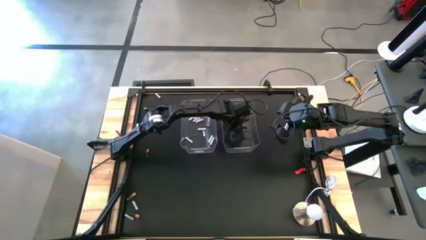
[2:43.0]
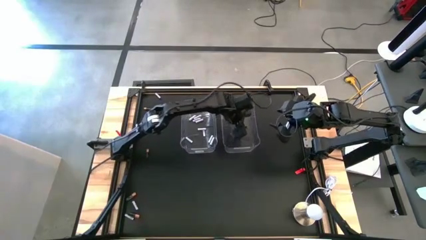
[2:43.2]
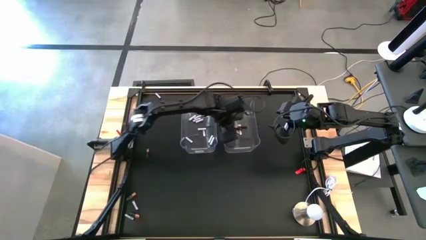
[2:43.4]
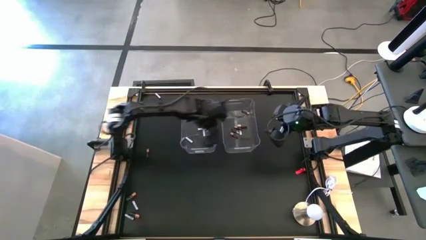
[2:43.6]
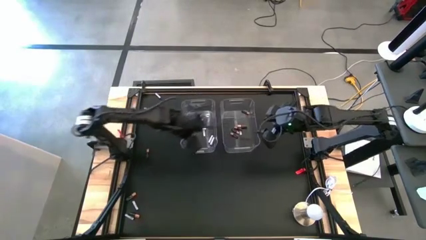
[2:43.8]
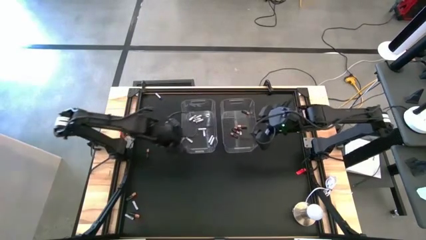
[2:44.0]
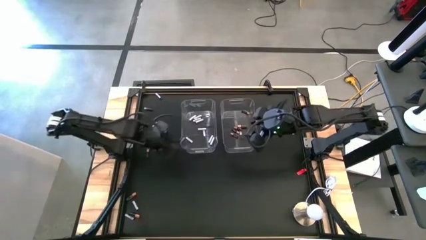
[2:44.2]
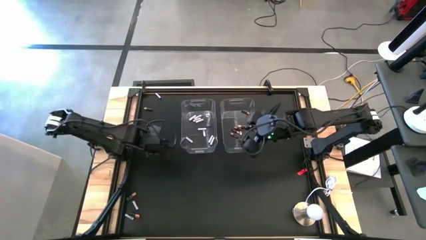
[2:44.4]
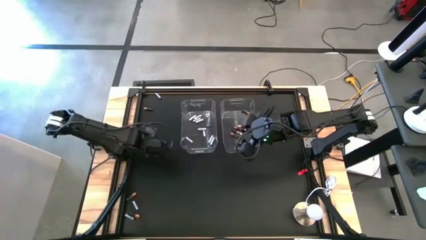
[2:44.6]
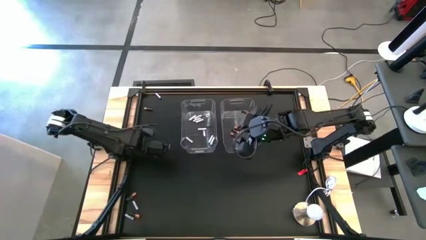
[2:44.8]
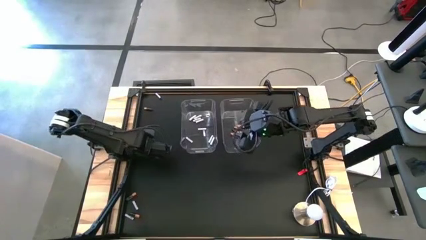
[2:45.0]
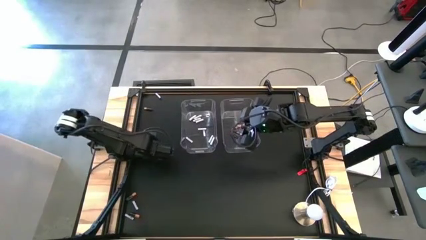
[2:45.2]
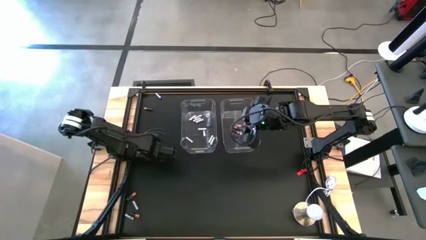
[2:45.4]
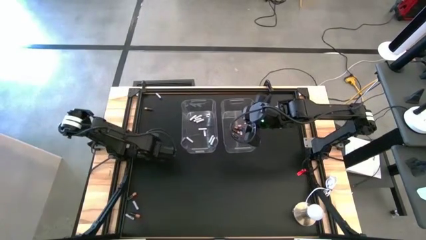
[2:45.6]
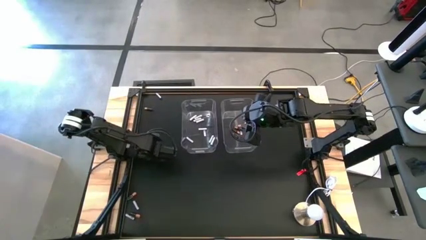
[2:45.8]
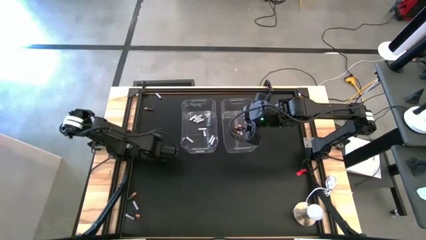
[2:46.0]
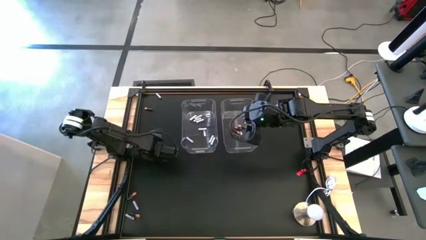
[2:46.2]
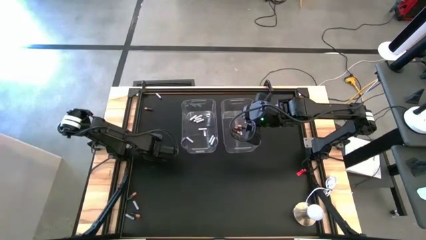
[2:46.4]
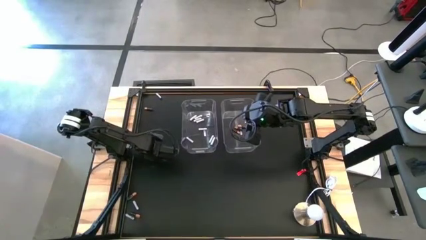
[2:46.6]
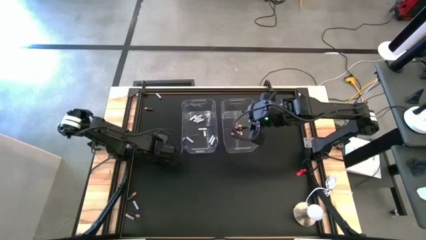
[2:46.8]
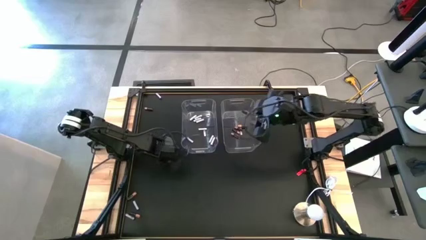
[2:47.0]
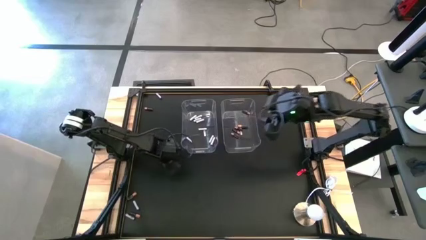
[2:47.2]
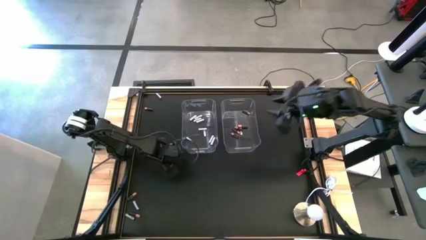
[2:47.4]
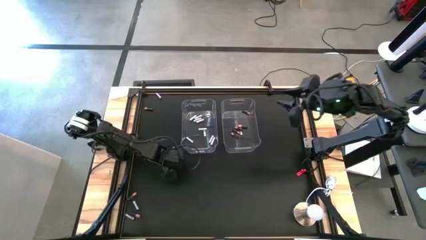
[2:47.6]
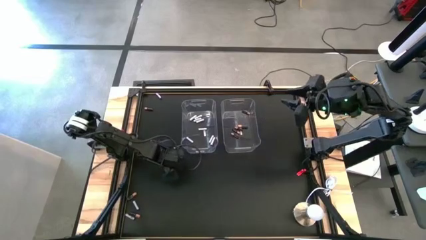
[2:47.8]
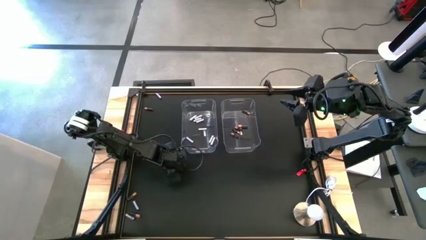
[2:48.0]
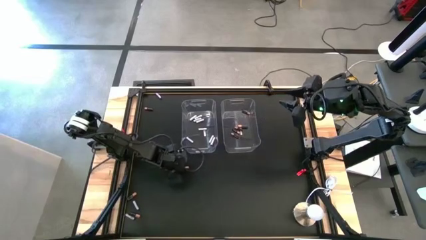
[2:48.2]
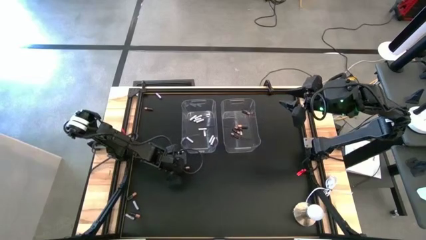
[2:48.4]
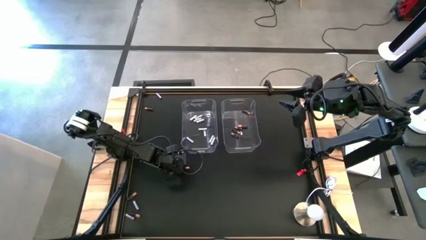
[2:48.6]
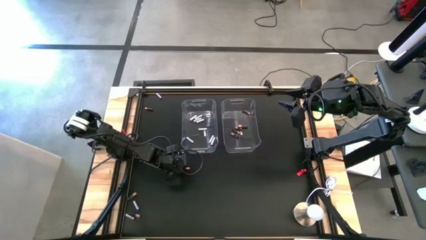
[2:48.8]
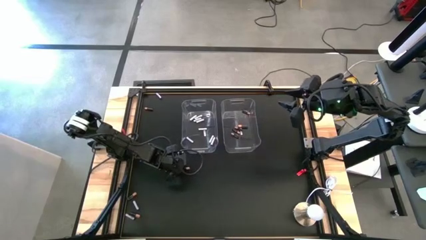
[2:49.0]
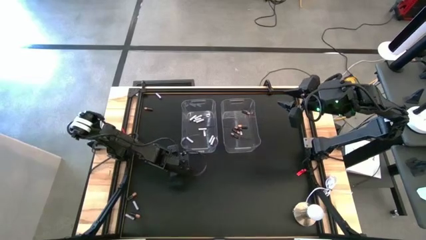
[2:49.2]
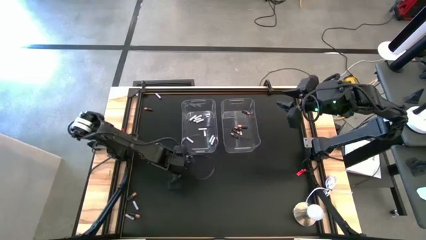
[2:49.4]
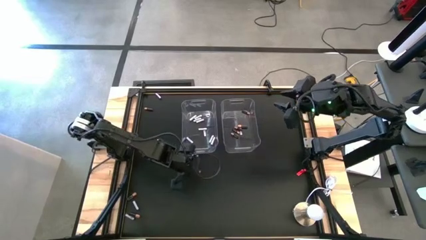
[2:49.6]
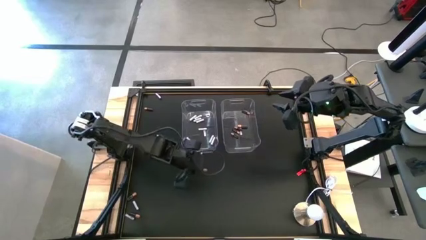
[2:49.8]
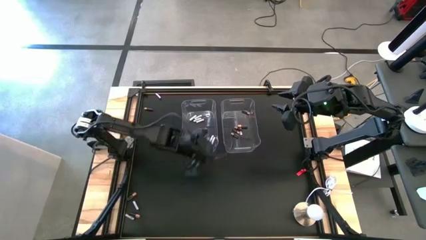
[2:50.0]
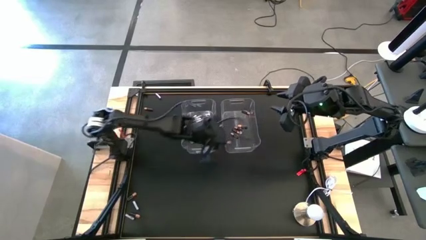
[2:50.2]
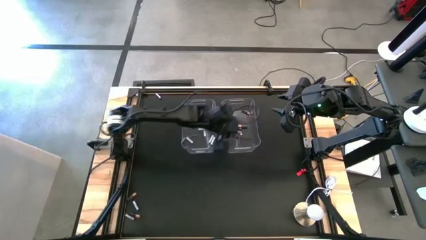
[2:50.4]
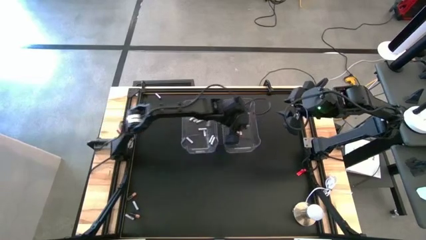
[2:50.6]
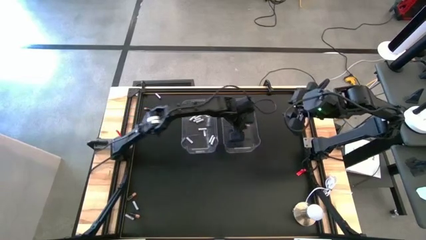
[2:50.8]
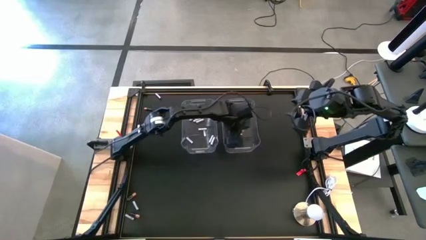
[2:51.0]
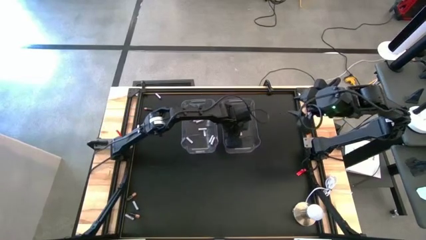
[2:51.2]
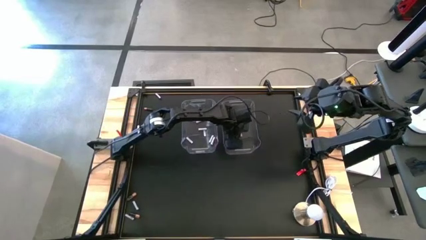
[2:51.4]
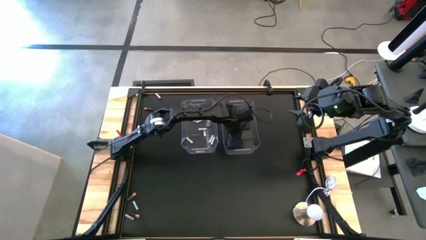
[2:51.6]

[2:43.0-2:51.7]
Task: Sort batteries
Put the black battery into the right transparent bin
